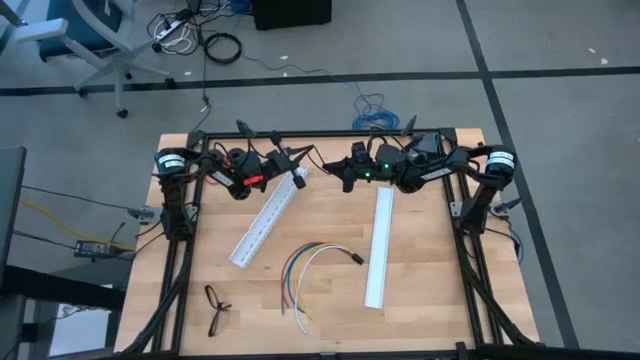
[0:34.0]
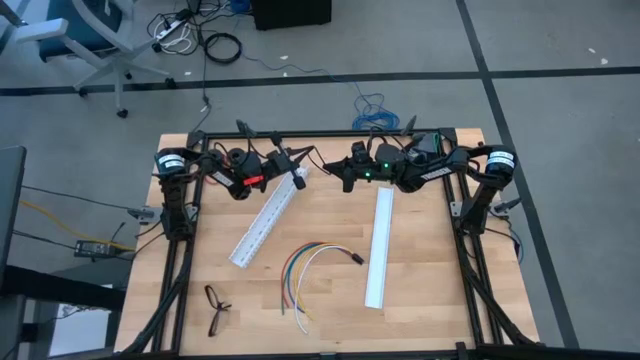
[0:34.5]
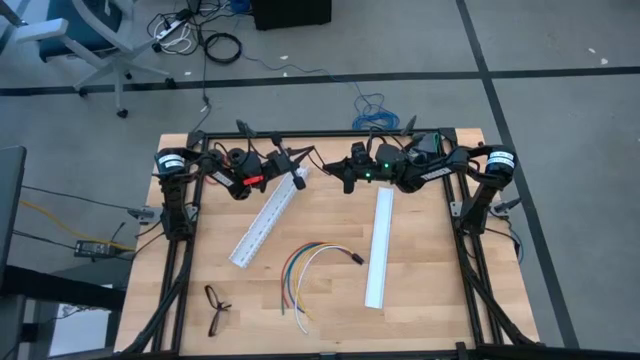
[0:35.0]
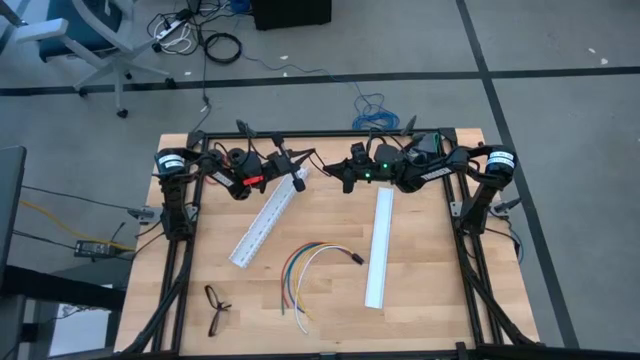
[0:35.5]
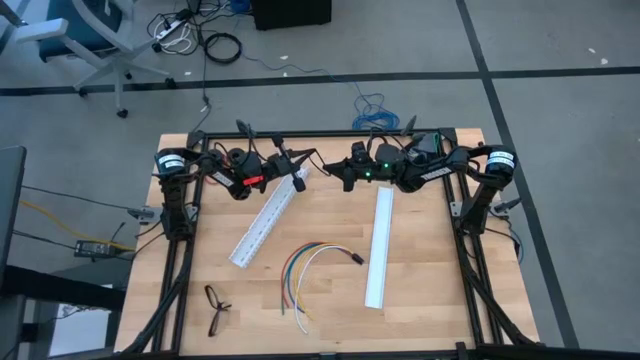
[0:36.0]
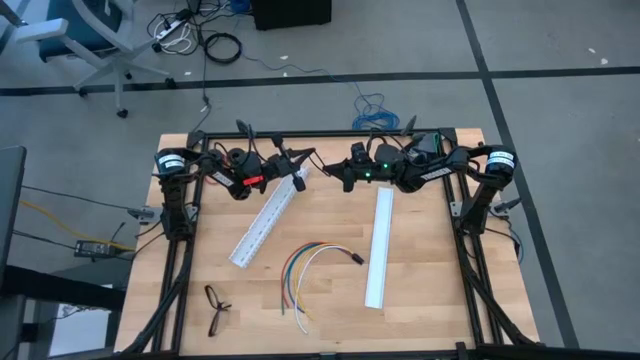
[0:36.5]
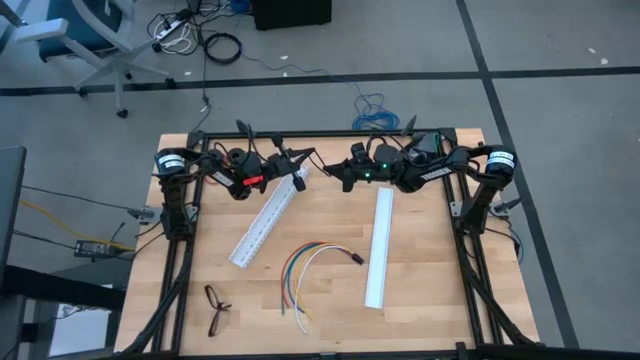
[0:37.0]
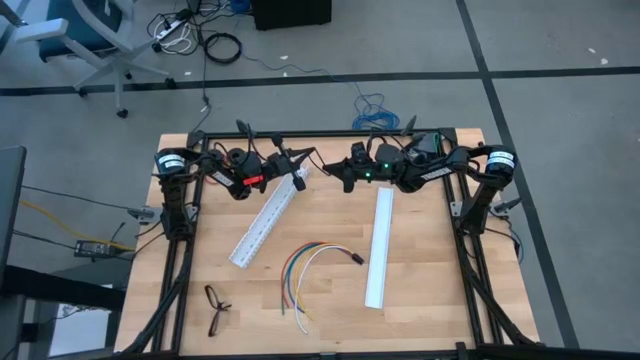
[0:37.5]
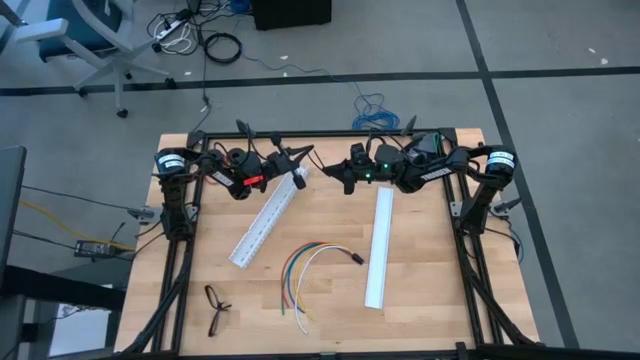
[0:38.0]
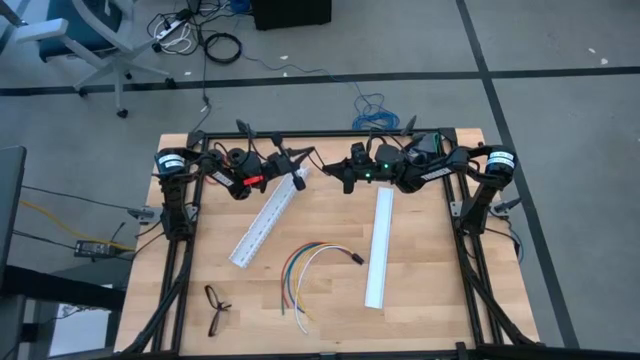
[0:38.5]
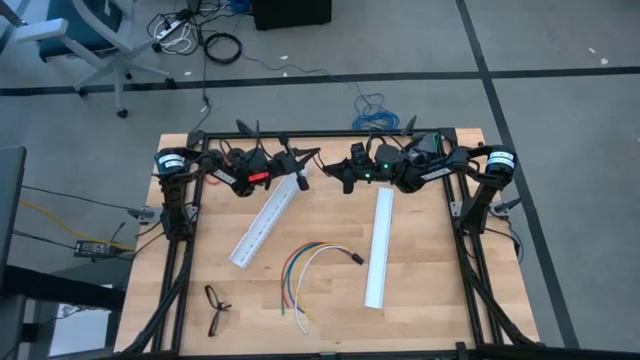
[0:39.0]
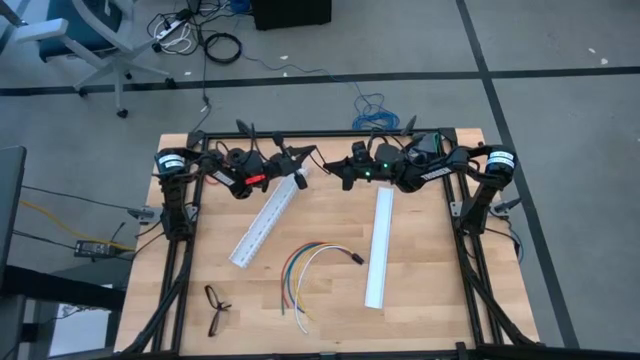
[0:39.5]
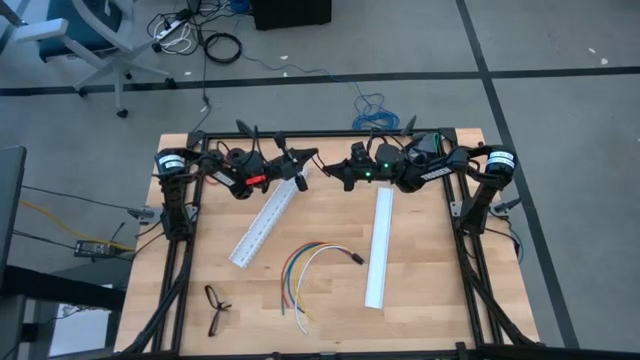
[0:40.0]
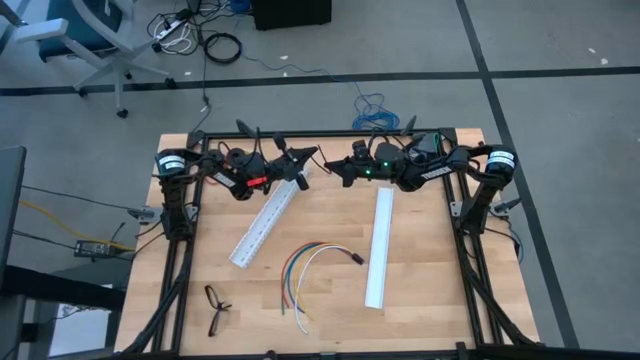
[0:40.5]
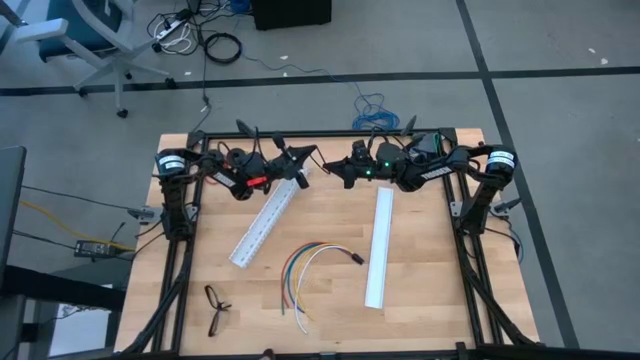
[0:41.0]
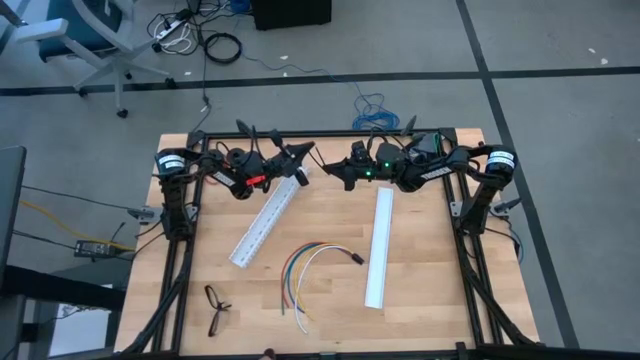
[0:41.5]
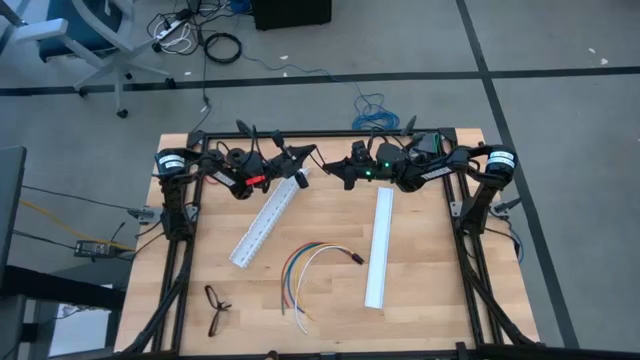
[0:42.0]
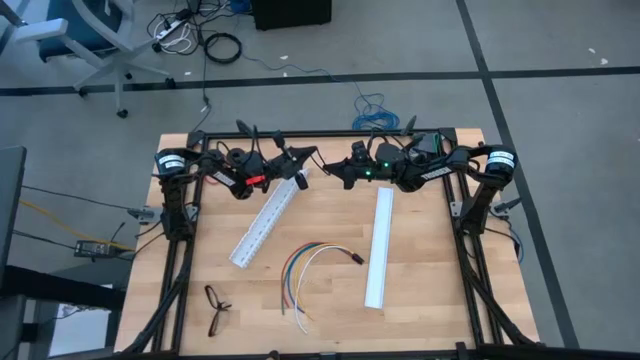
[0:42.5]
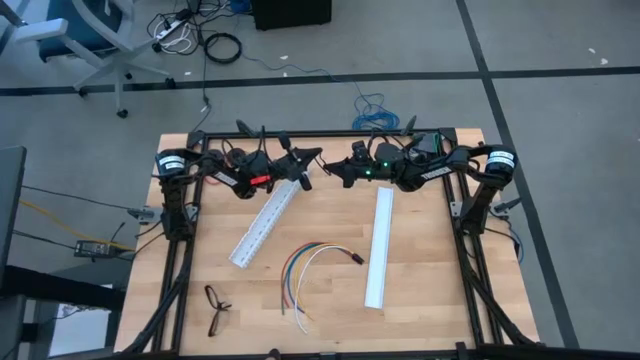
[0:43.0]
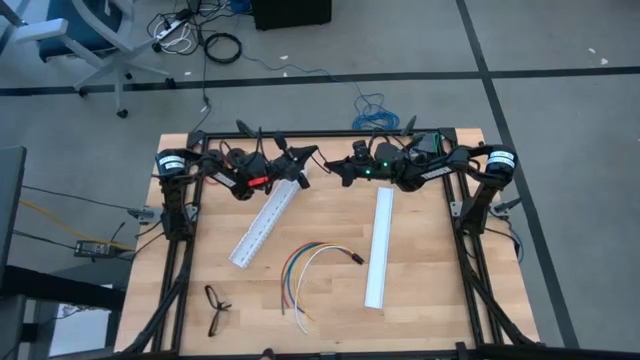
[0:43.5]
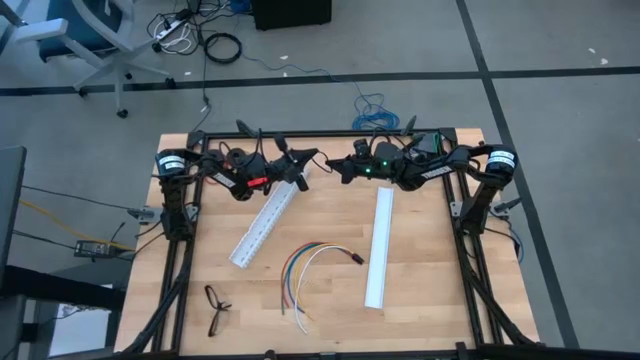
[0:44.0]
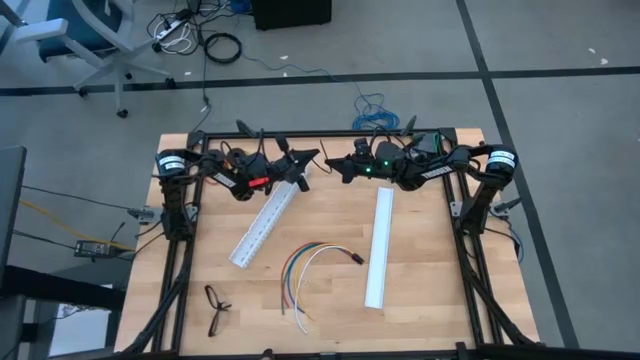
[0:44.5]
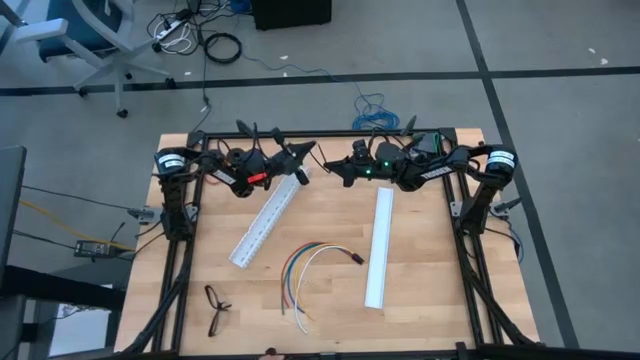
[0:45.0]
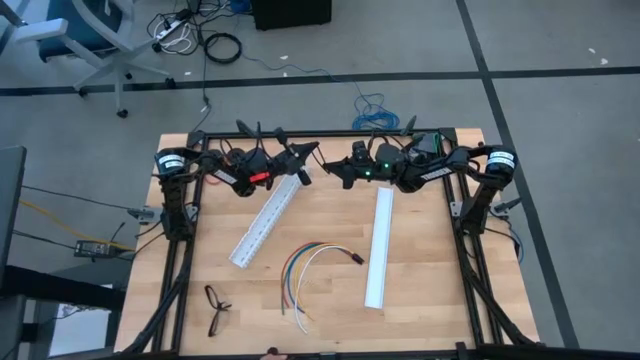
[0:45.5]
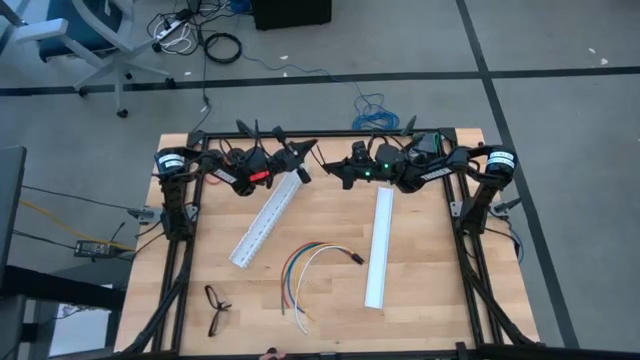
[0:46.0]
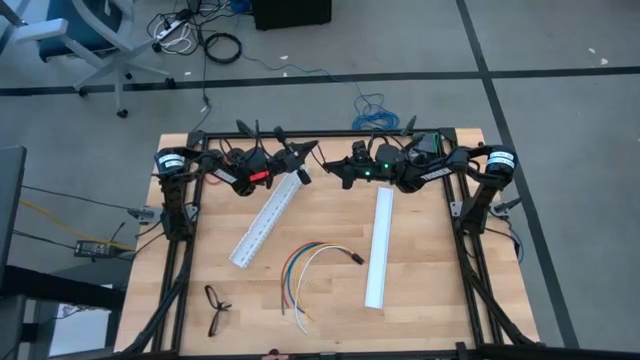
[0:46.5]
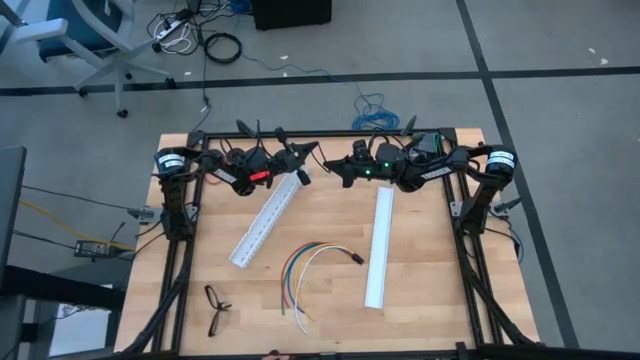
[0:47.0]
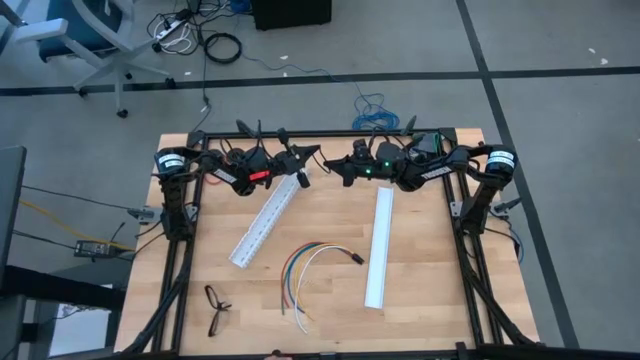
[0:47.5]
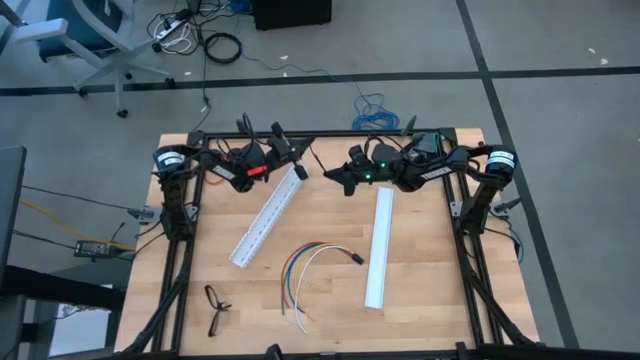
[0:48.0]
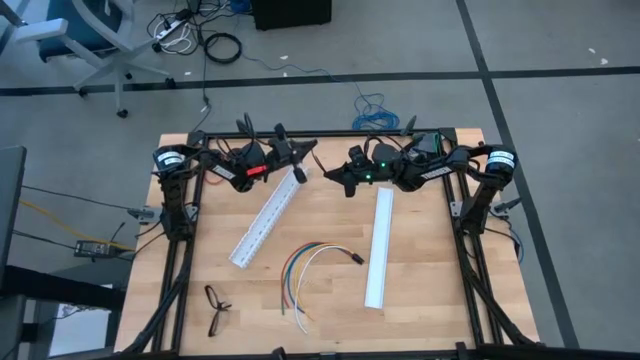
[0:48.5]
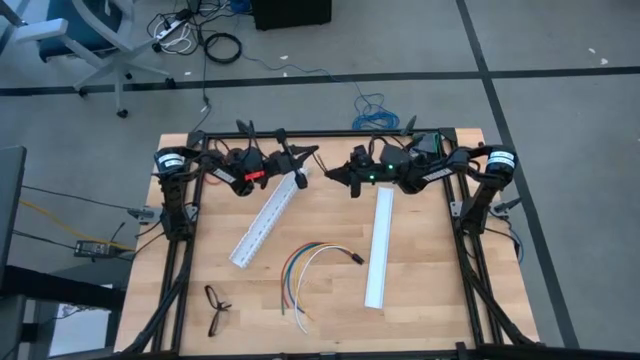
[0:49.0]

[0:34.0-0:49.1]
Task: Ziptie cables
Wrap the cable wires together using the black zip tie
